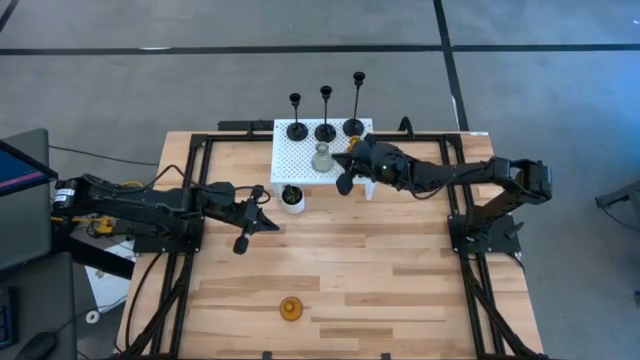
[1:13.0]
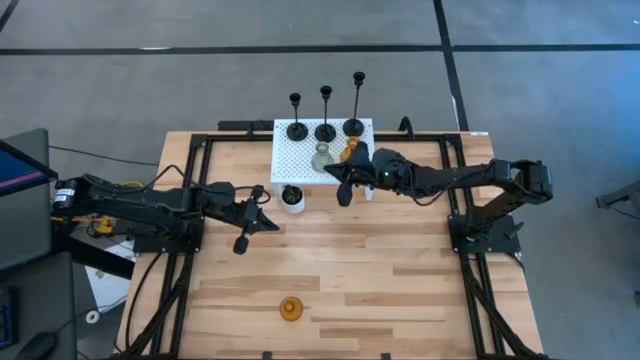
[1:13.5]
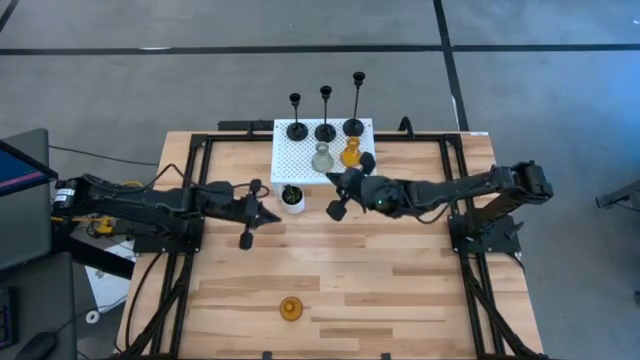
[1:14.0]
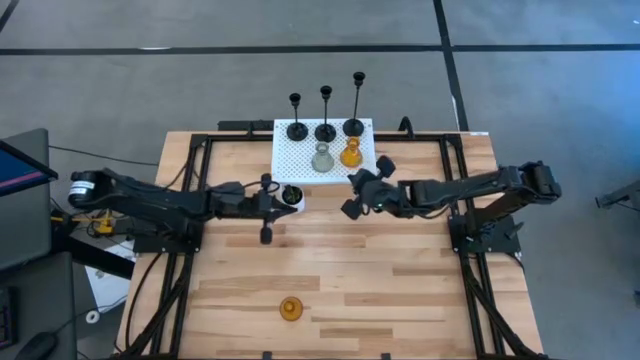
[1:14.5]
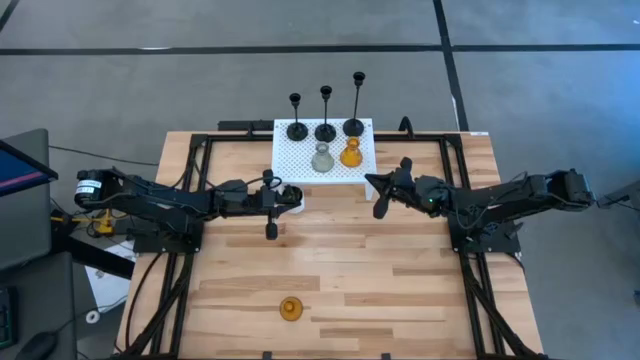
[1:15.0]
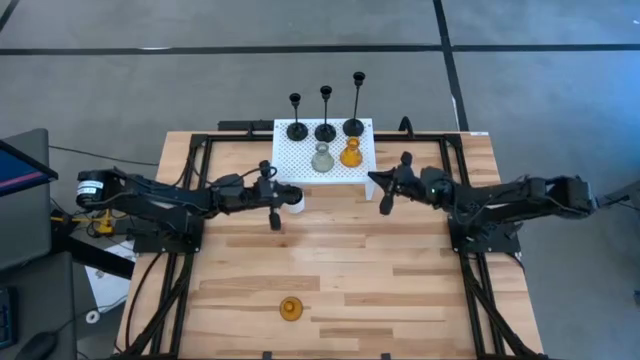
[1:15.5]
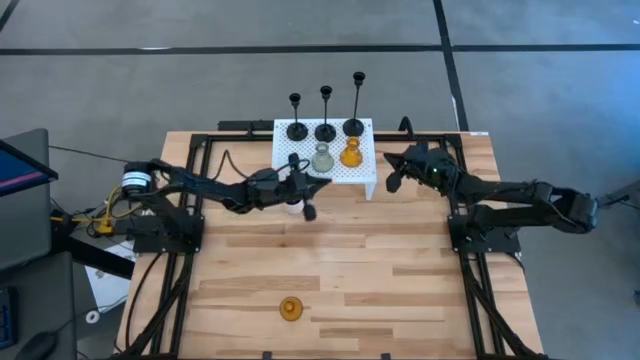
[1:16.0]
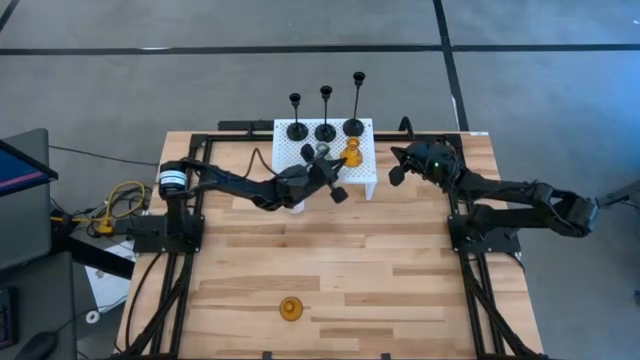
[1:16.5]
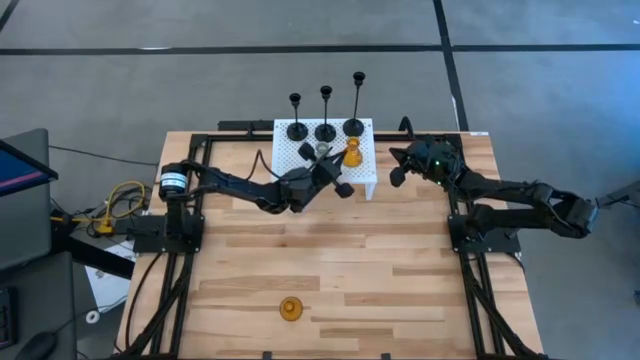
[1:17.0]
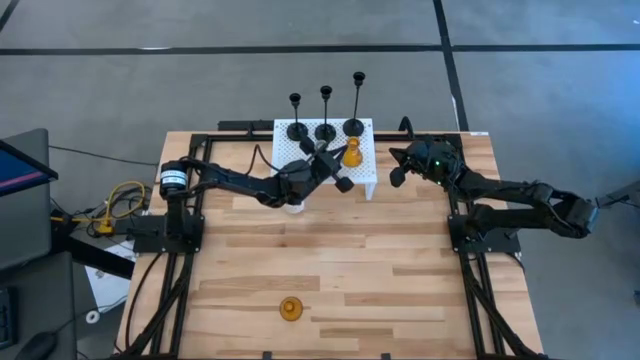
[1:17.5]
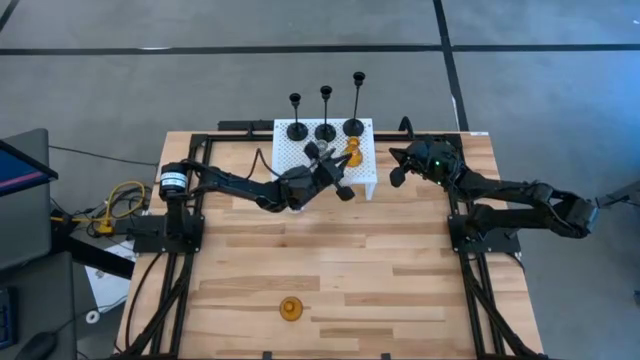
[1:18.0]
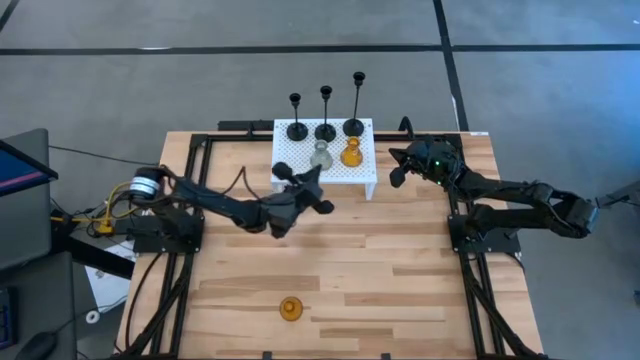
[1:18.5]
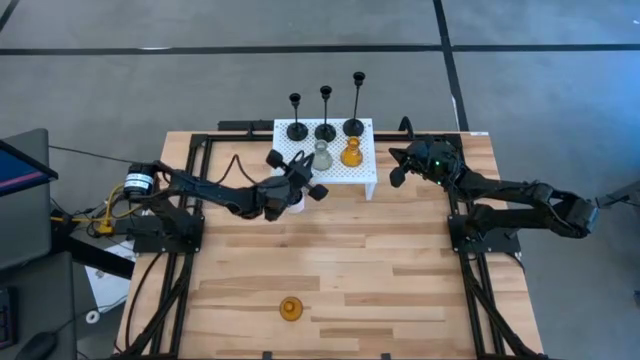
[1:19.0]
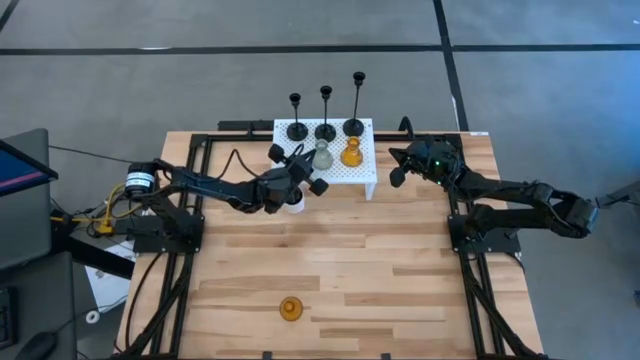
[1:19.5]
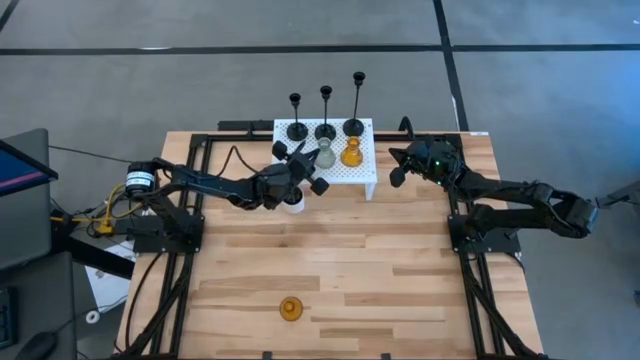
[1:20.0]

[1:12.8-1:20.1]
Task: Pick & Place candle stick holders
Adjust the glass candle holders on the shelf

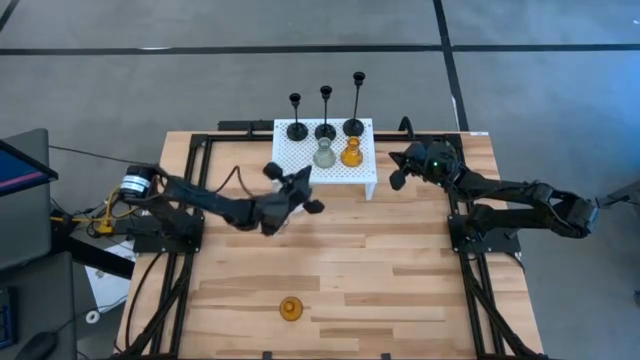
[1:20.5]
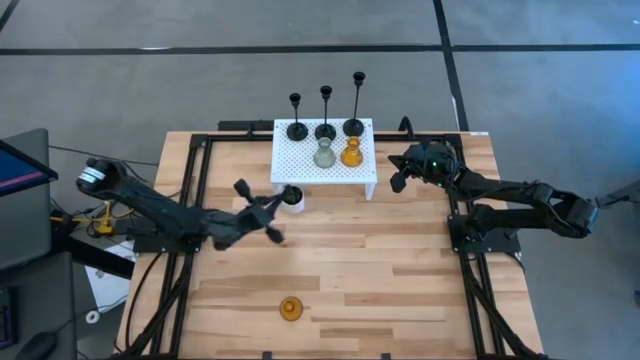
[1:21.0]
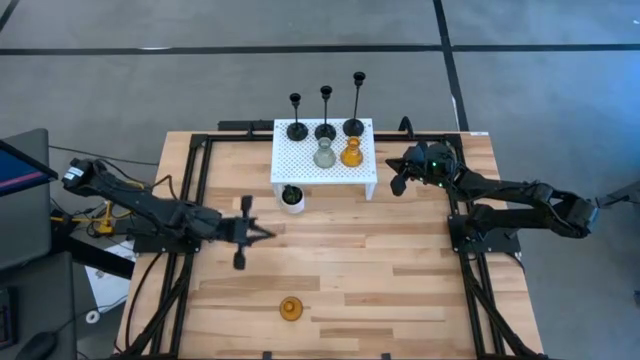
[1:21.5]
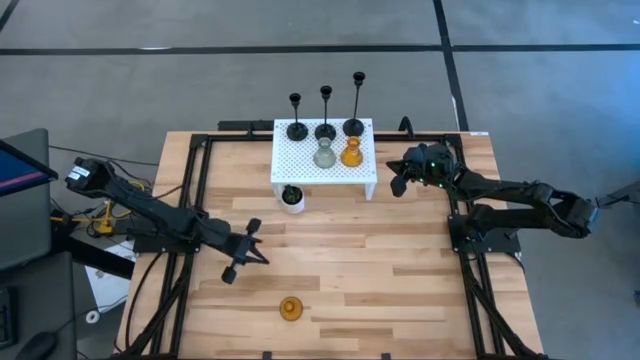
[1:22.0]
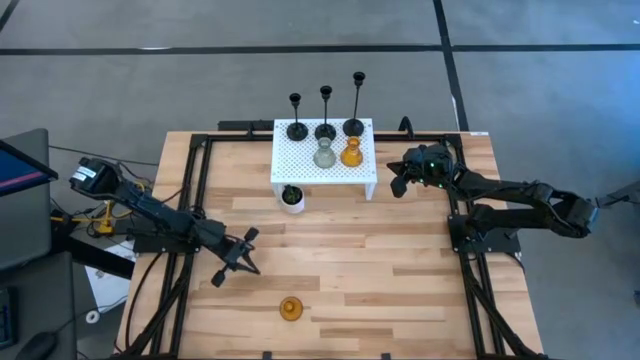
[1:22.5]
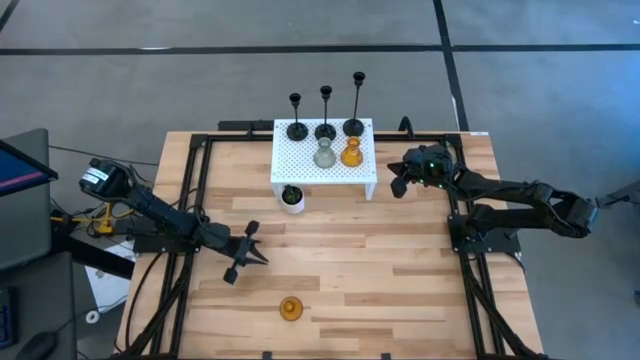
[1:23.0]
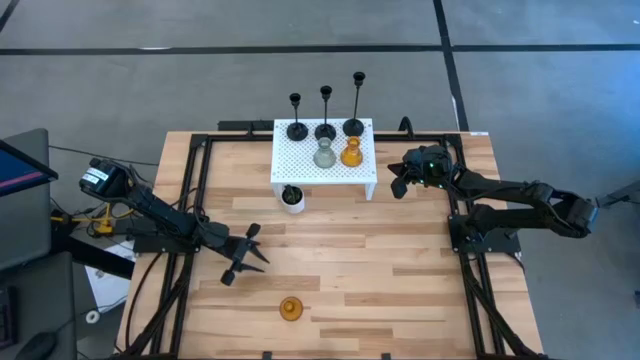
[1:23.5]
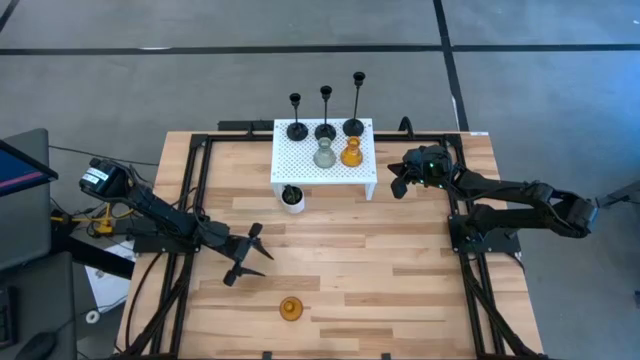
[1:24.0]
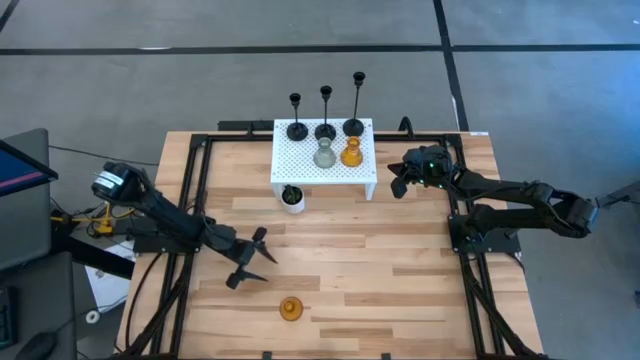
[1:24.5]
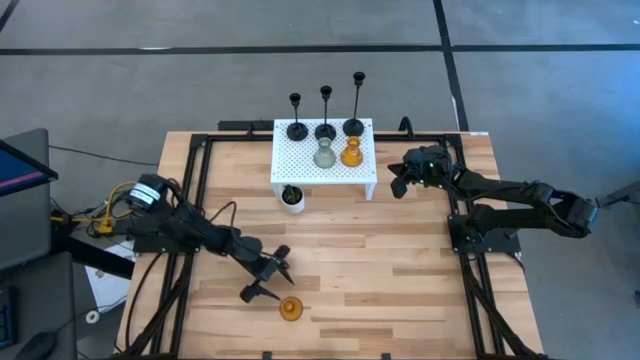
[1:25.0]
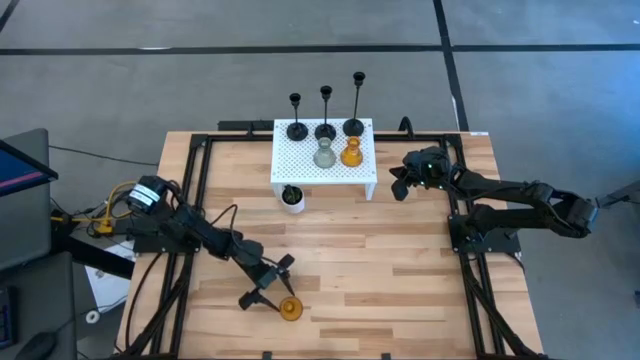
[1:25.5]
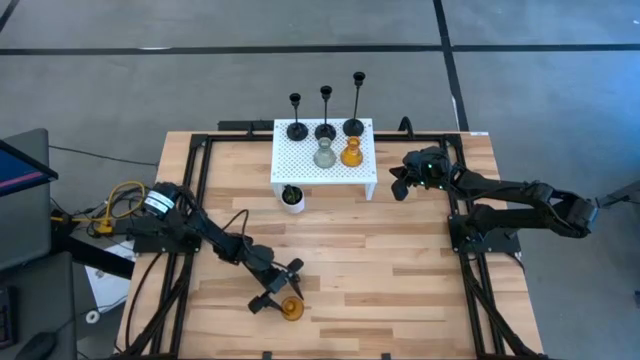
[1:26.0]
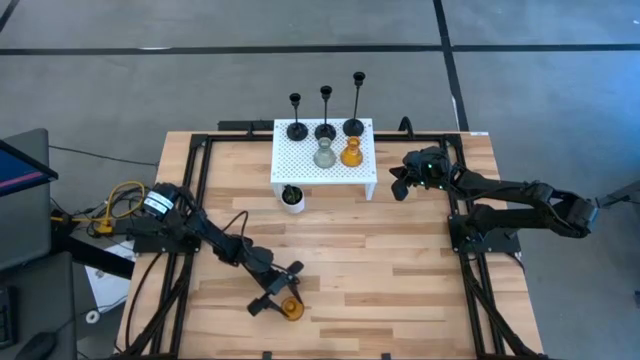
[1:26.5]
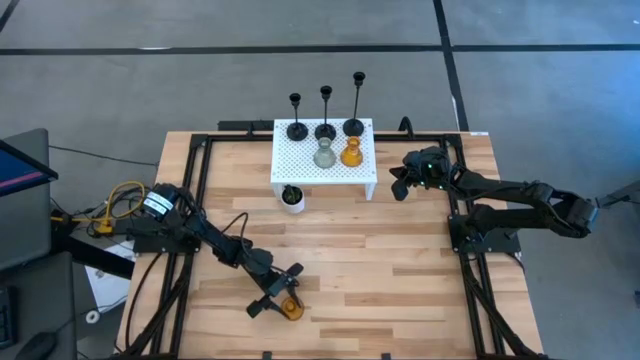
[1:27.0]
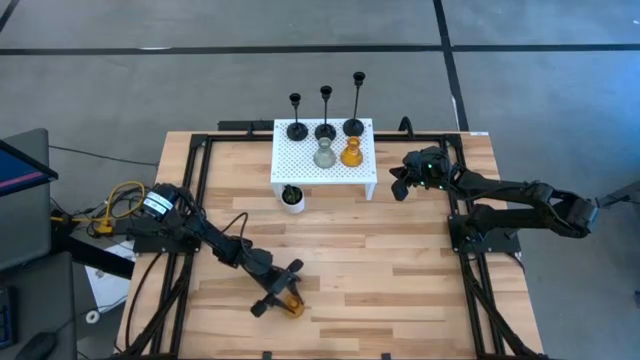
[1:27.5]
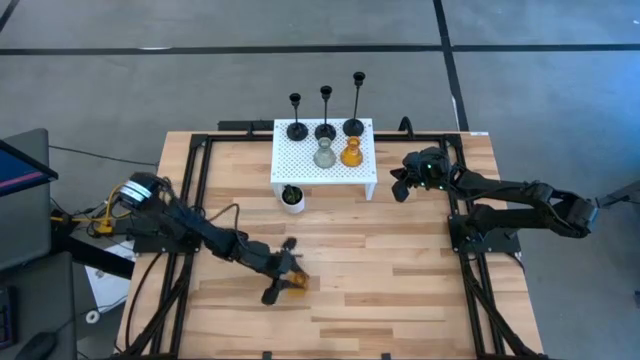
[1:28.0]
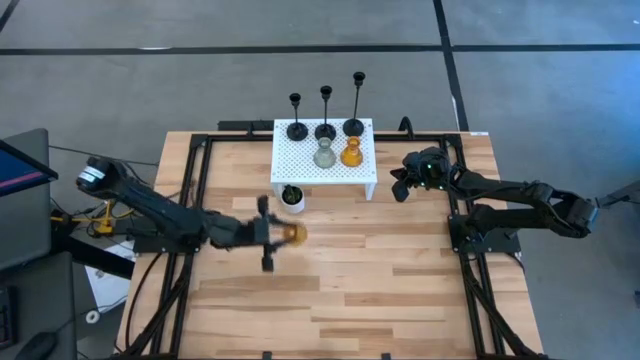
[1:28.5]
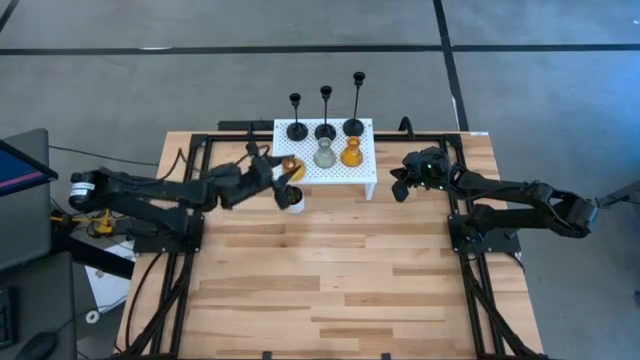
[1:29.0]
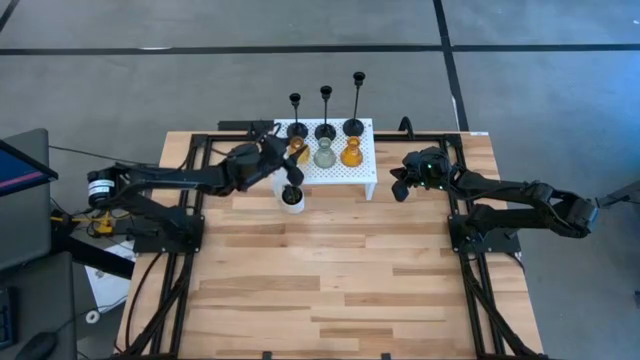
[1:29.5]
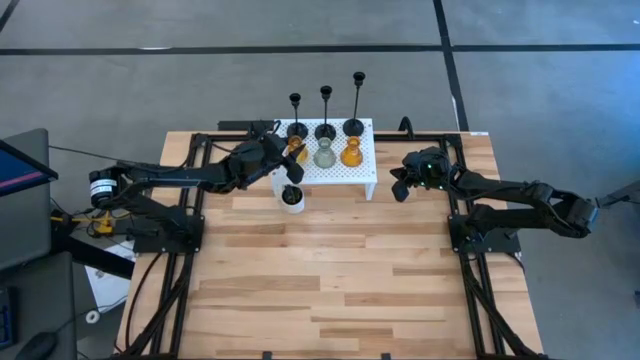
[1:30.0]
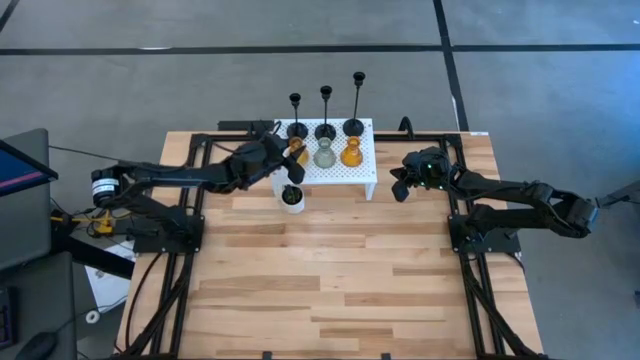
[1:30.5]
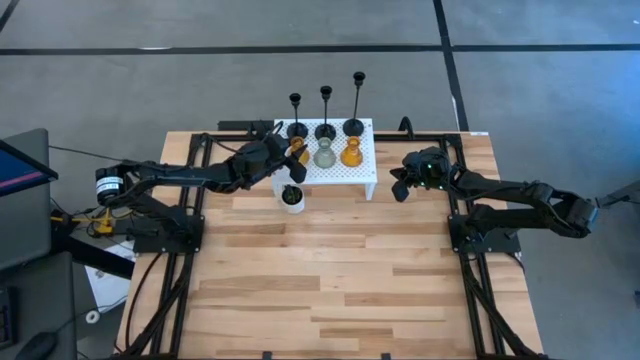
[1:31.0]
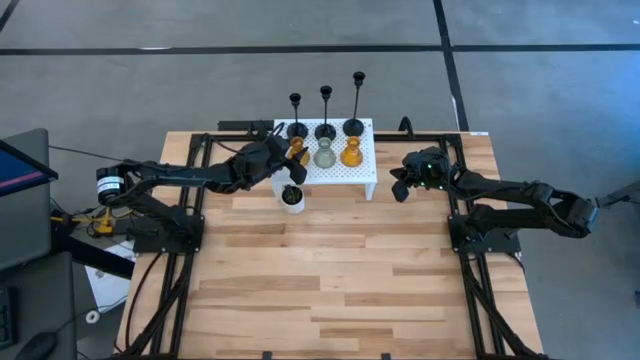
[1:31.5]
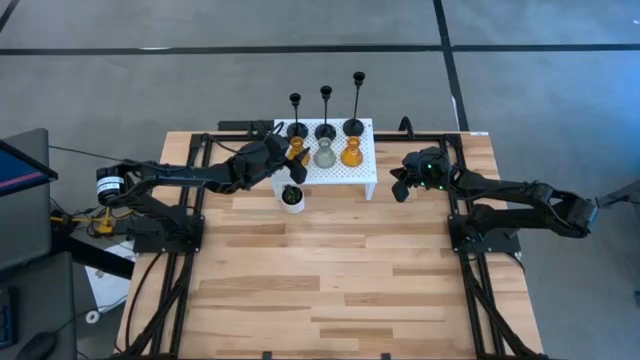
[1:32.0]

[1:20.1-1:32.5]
Put the yellow glass candle holder on the shelf aligned with the other glass candle holders

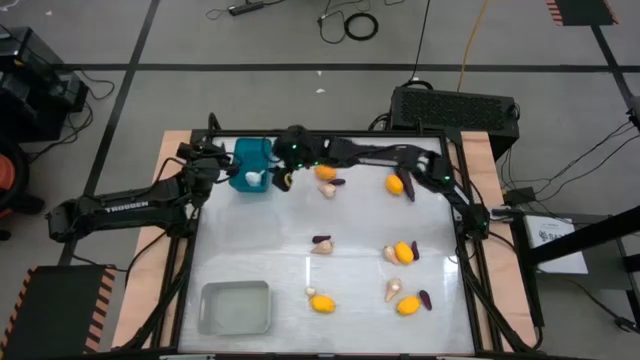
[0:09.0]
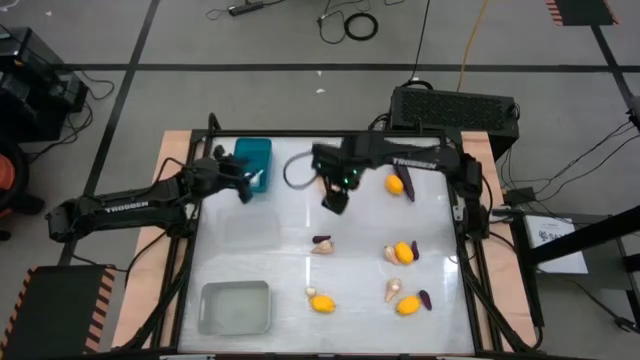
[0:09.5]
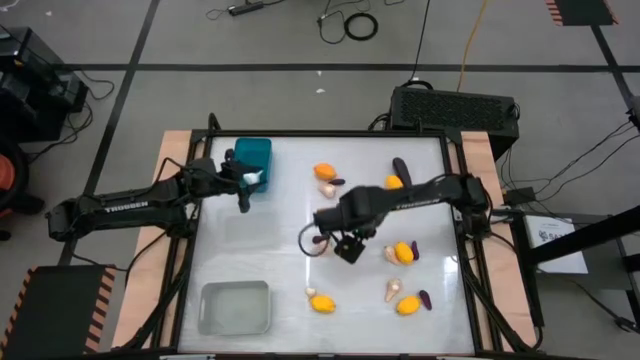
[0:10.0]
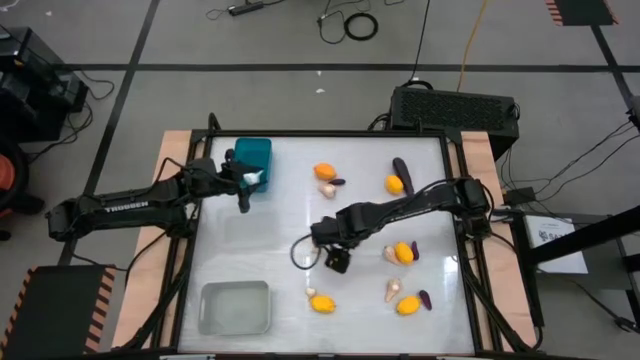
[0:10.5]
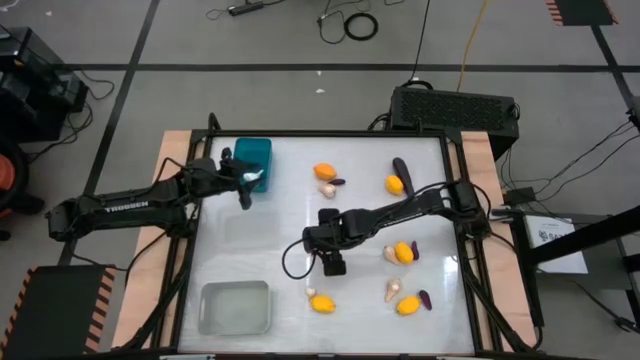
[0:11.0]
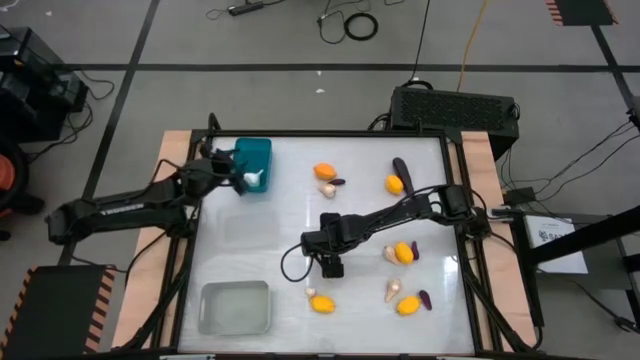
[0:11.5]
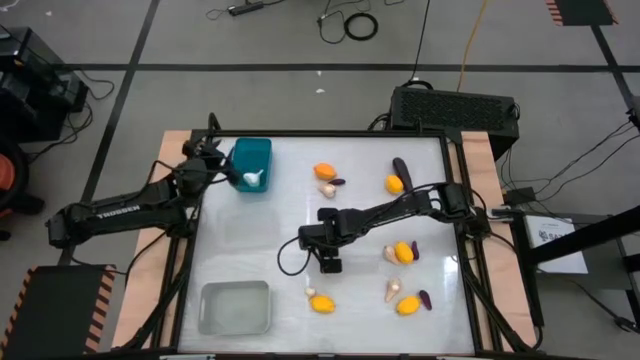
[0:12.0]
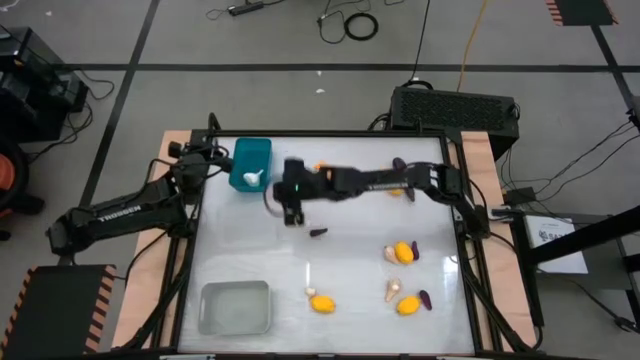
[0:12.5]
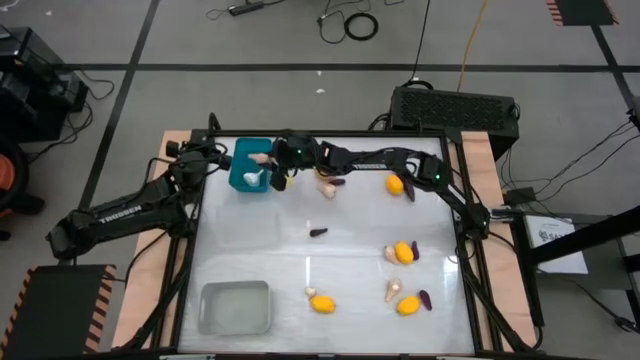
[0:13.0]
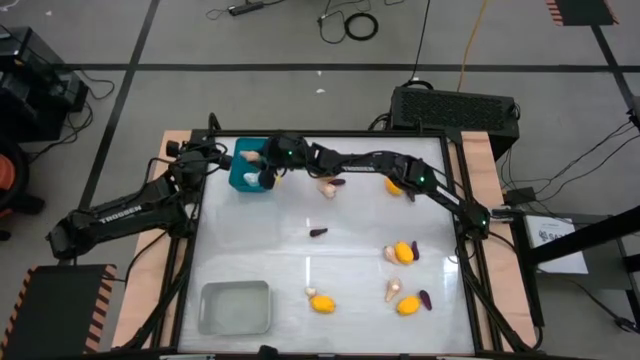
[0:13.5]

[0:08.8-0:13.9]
Task: Sort produce into baskets
Put the garlic into the blue bin
